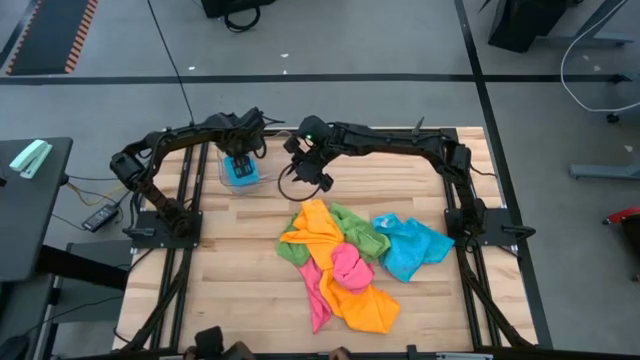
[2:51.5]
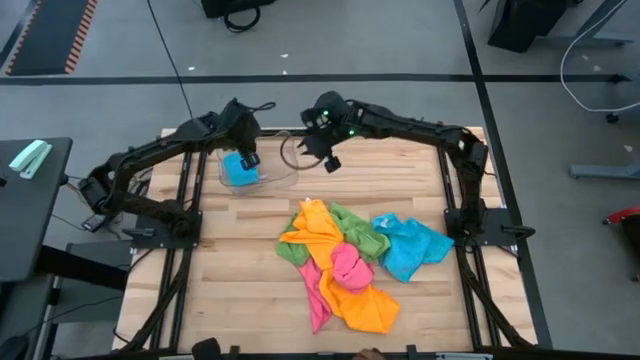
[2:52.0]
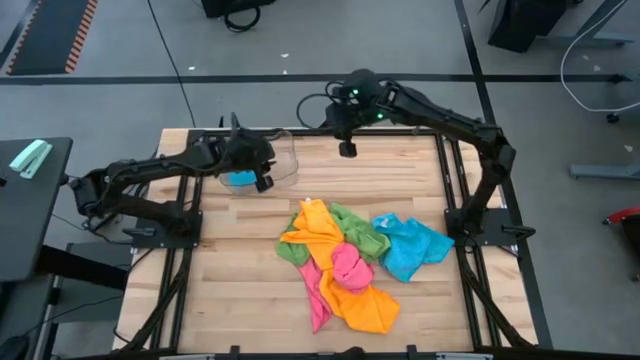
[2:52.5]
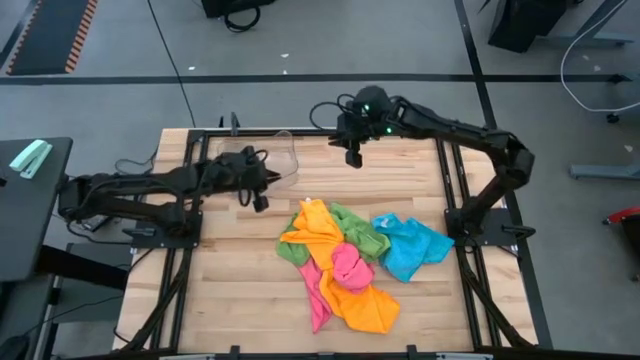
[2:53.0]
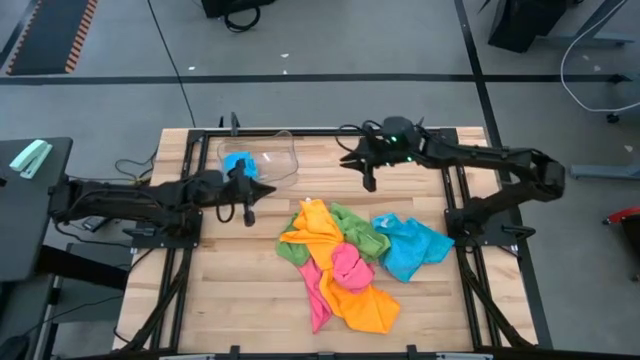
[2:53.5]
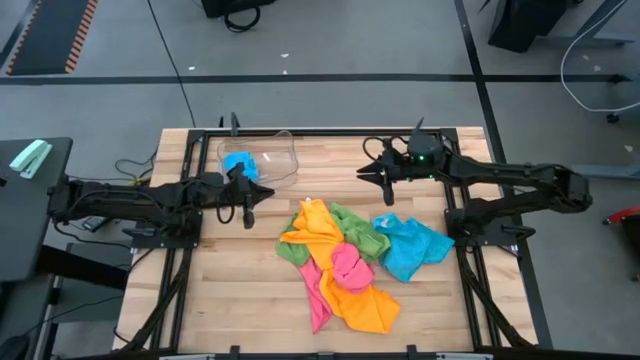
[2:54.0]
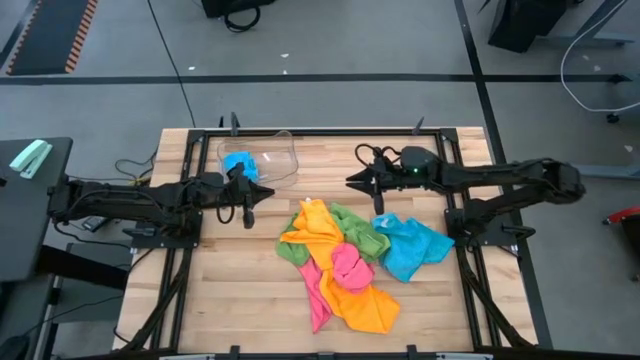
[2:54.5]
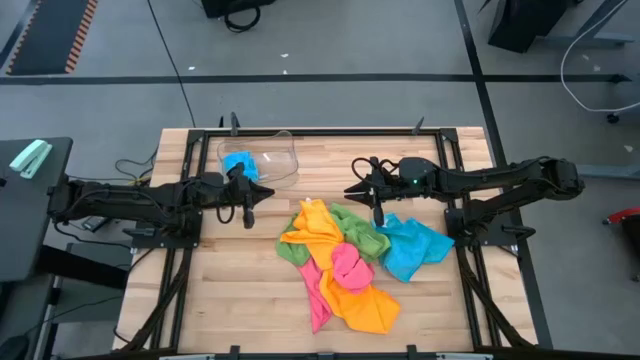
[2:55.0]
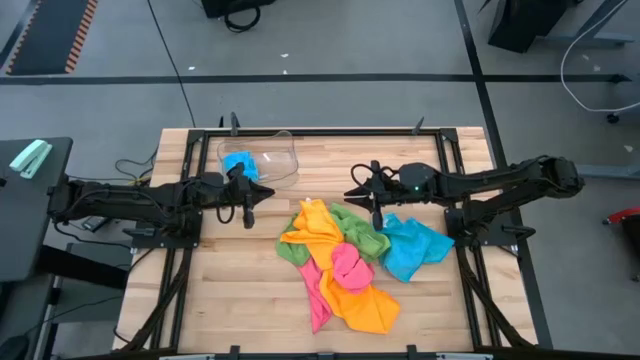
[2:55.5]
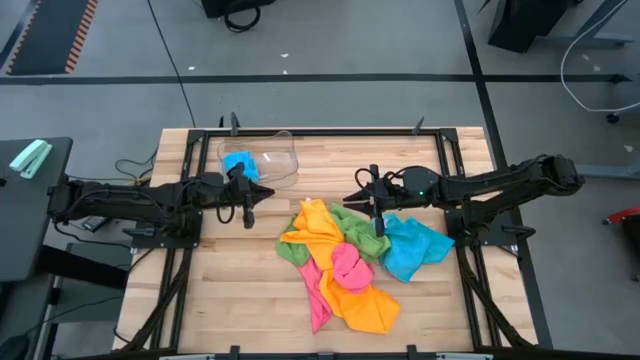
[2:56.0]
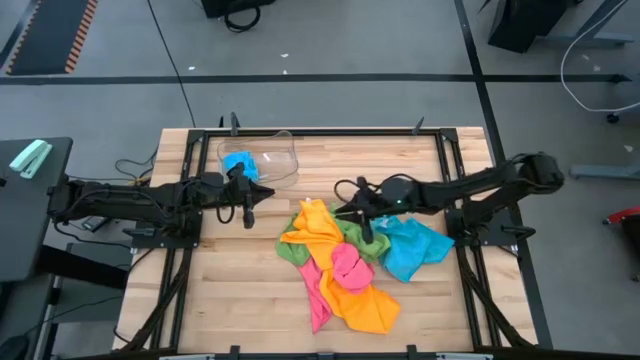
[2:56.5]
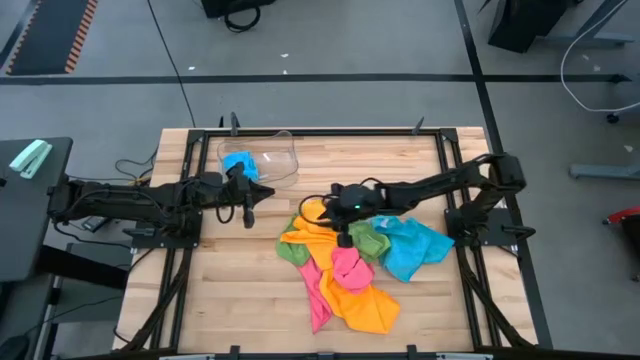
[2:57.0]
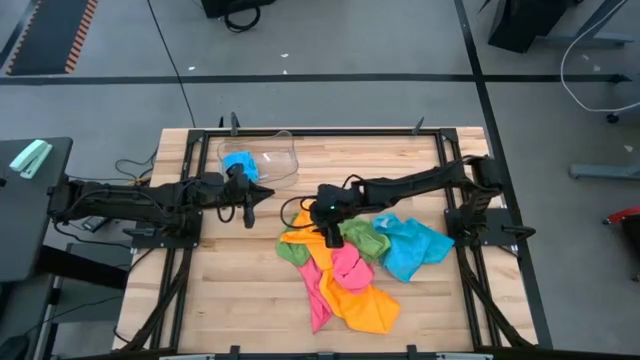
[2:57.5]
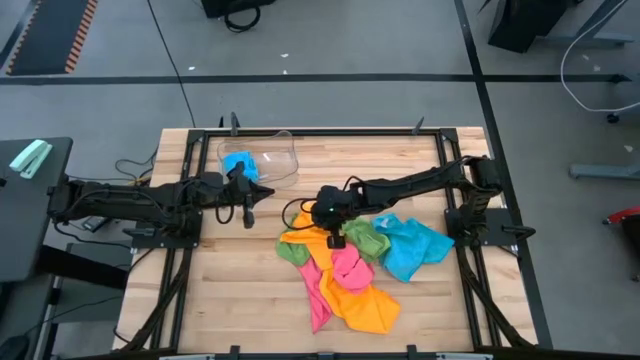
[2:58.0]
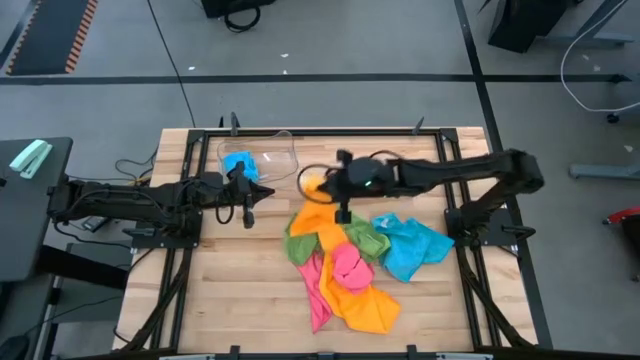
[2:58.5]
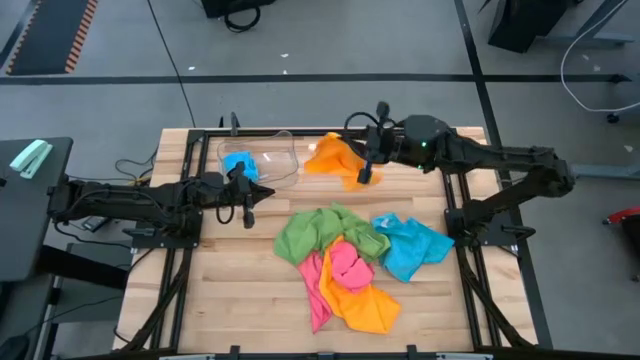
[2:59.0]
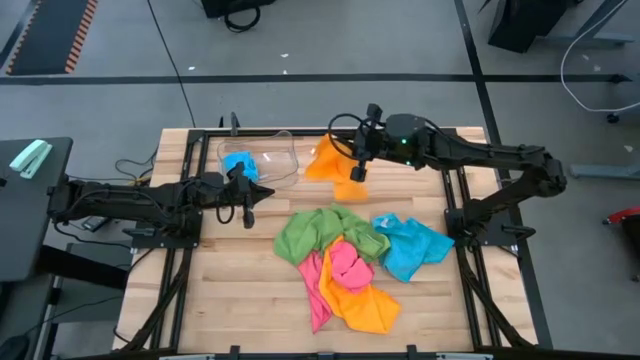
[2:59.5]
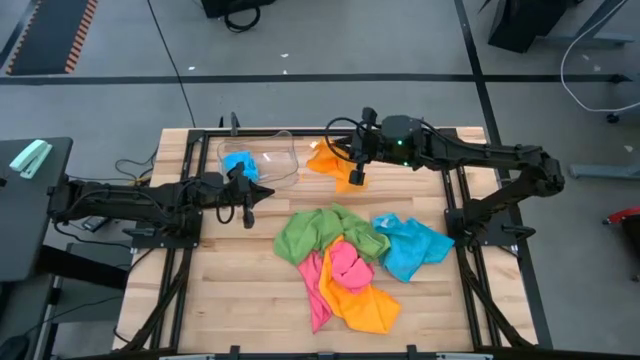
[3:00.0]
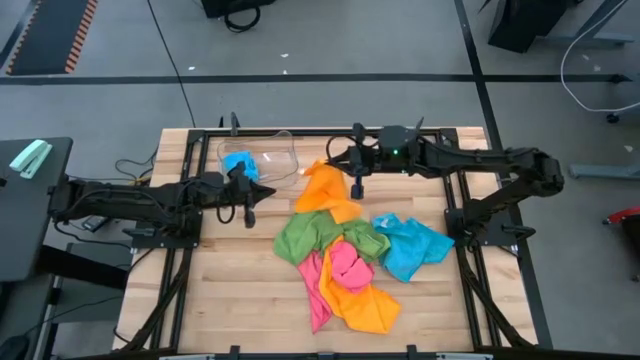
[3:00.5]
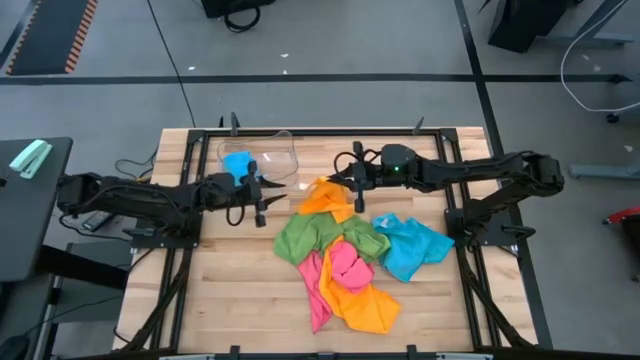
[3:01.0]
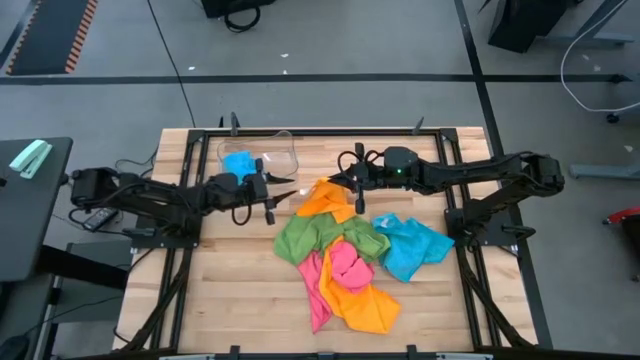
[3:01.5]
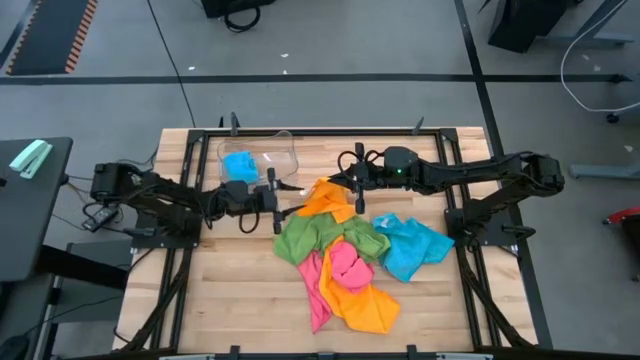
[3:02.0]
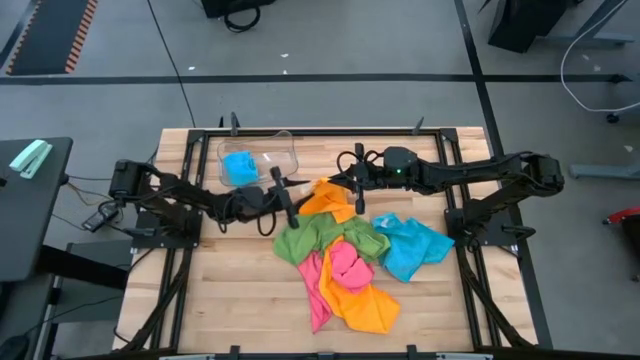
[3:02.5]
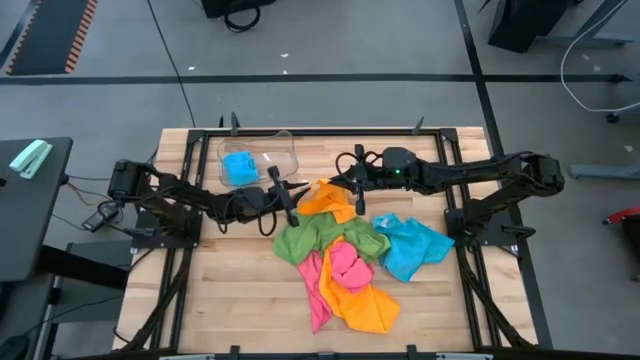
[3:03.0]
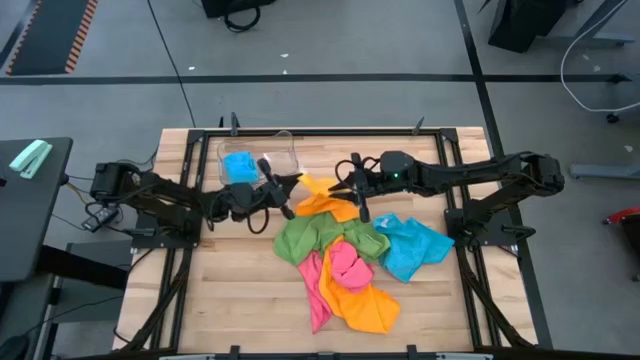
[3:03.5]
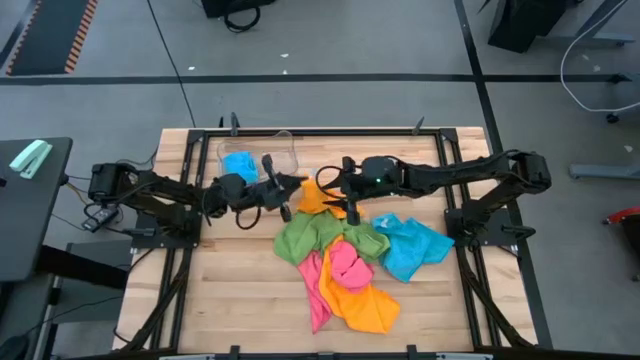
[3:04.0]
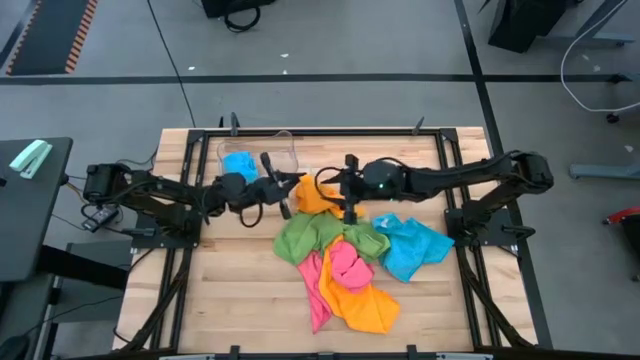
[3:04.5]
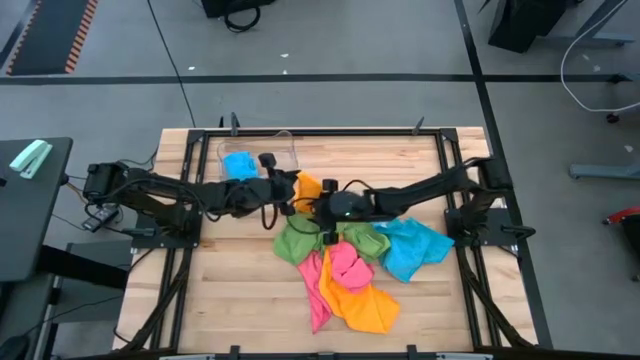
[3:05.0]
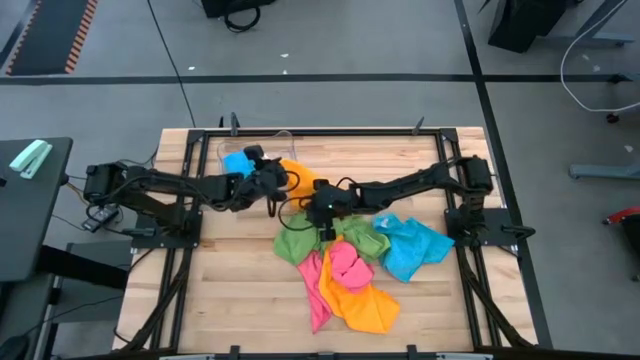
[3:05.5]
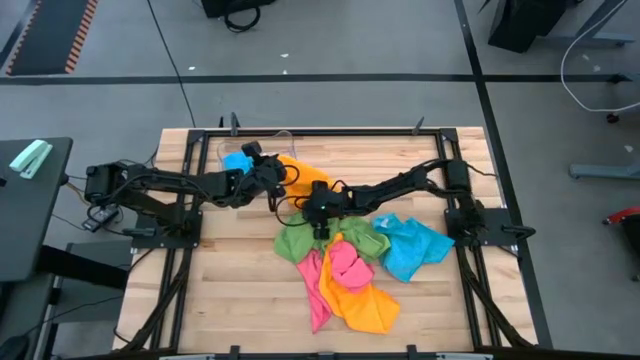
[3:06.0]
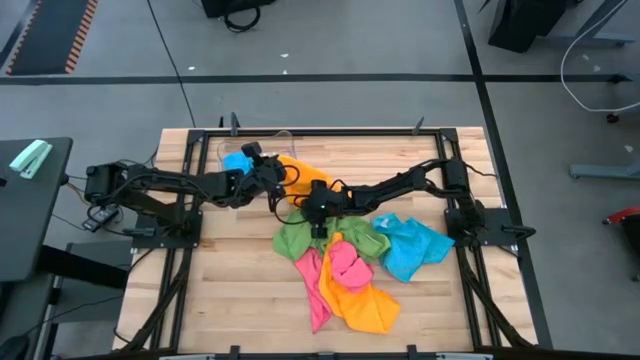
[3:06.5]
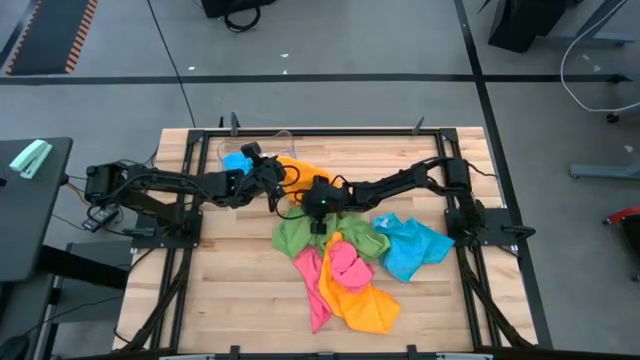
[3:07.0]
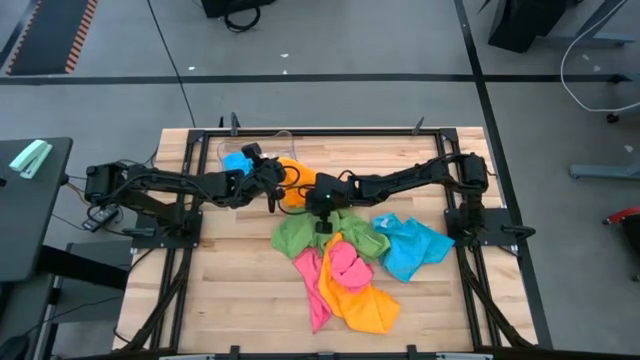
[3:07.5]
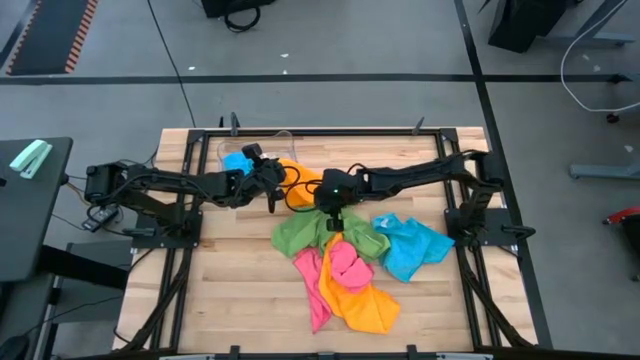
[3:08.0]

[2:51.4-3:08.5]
Task: Fold microfiber towels
Fold the top orange microfiber towel

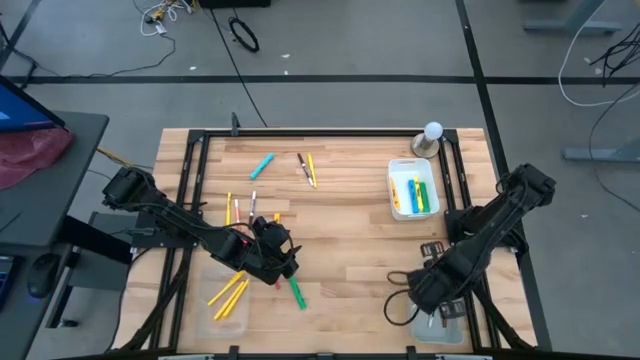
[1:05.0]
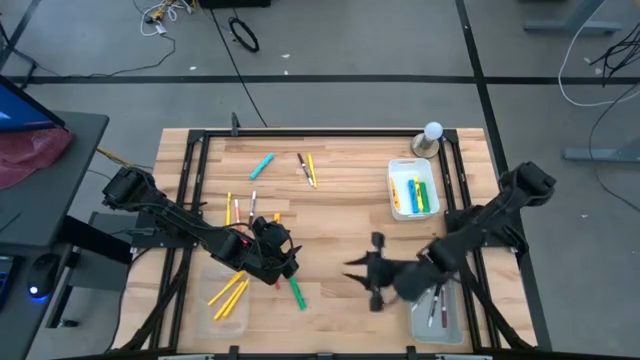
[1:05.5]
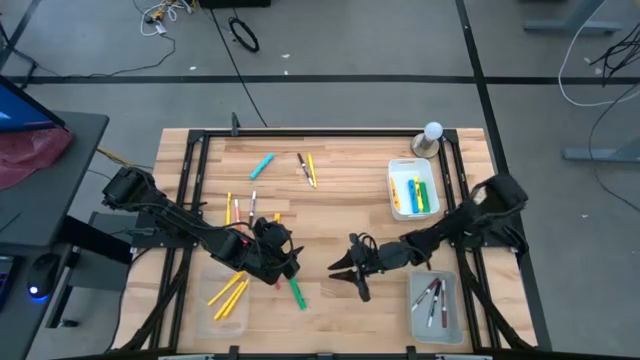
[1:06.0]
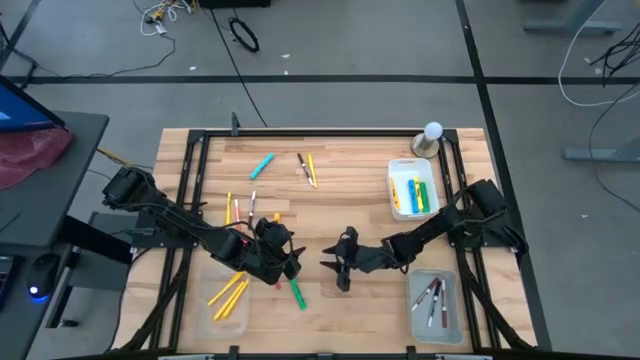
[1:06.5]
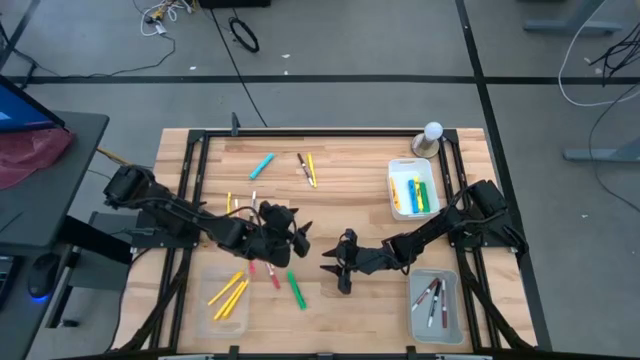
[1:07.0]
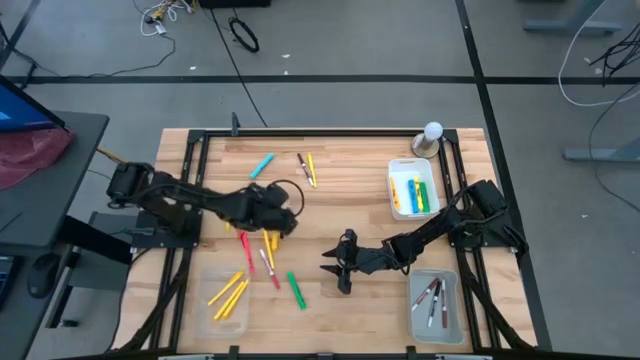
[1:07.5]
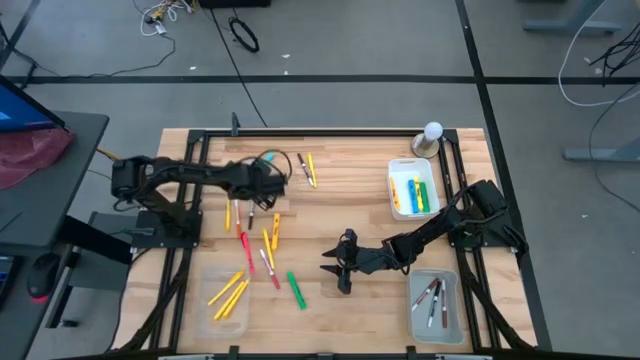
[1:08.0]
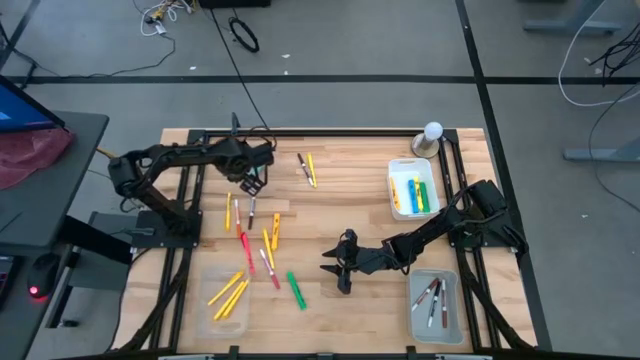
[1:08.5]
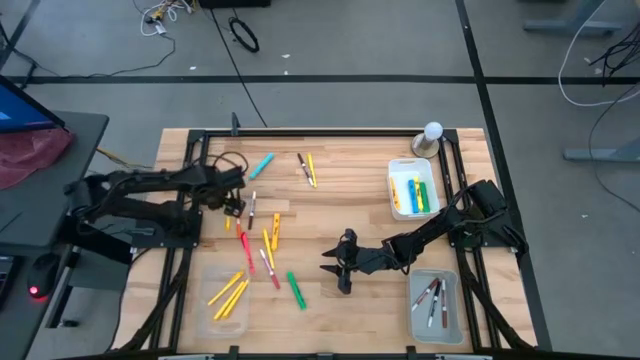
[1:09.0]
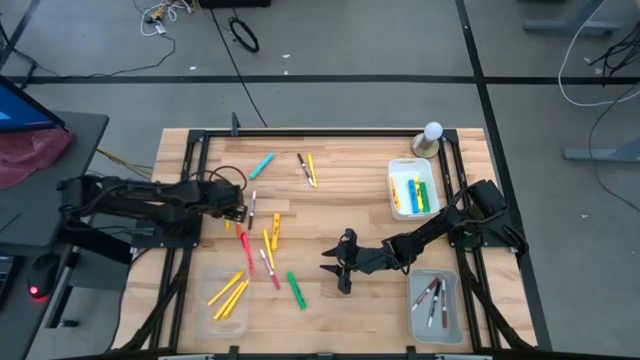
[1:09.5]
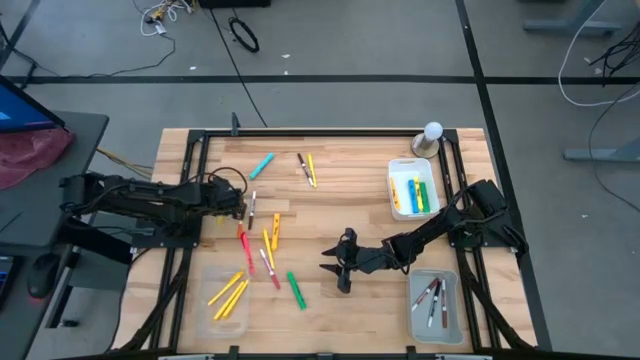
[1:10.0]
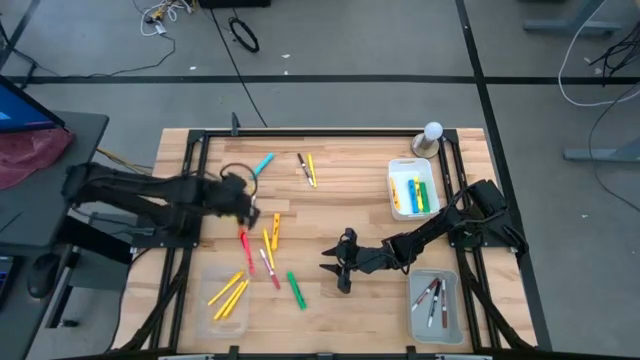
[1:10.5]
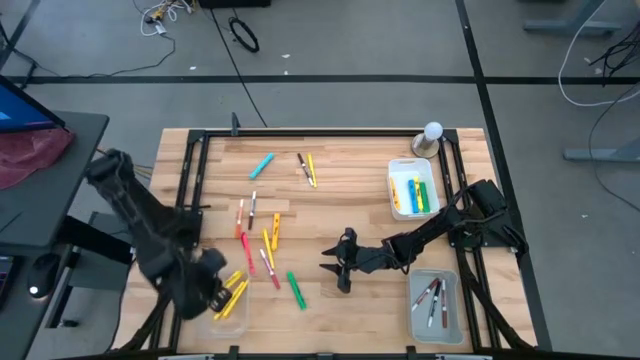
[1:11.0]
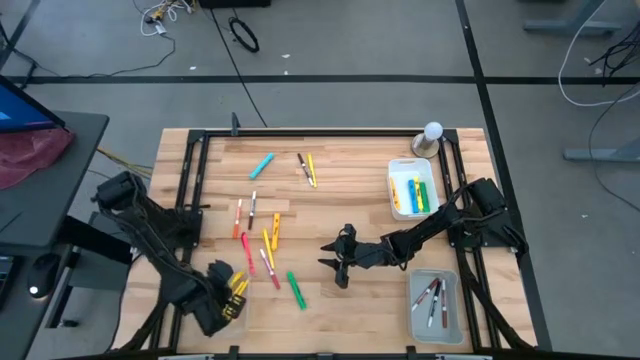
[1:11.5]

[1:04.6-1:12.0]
Task: Pick & Place Markers
Put the yellow pen into the transparent bin
